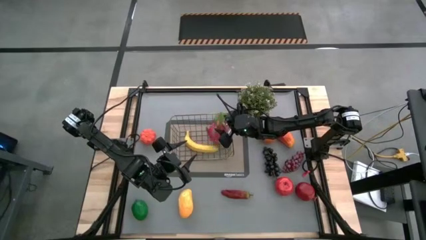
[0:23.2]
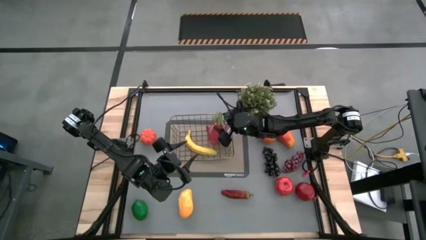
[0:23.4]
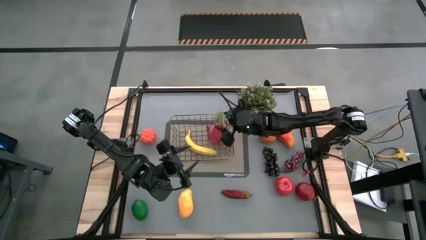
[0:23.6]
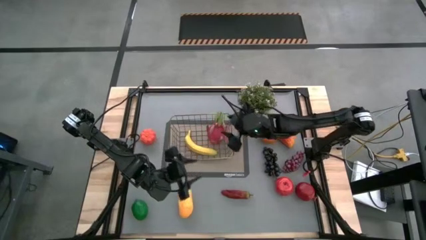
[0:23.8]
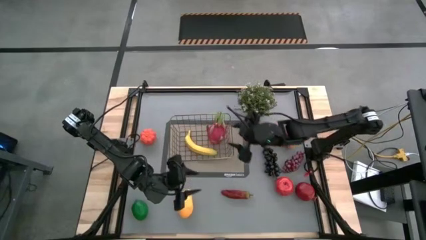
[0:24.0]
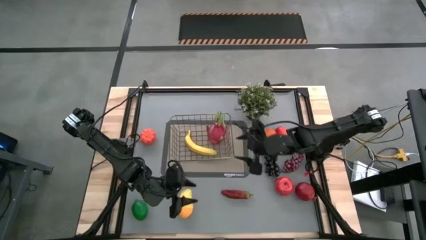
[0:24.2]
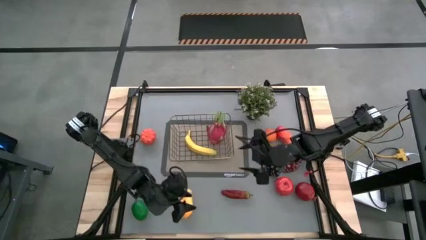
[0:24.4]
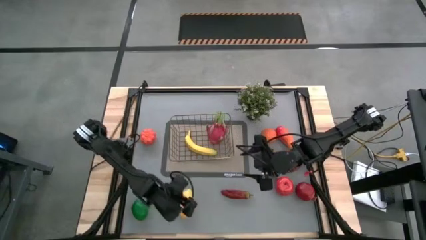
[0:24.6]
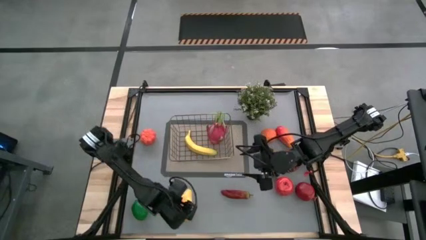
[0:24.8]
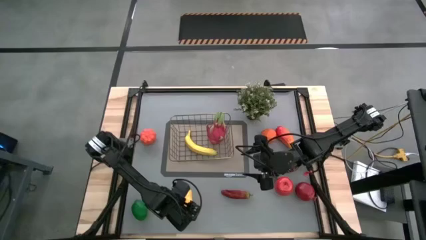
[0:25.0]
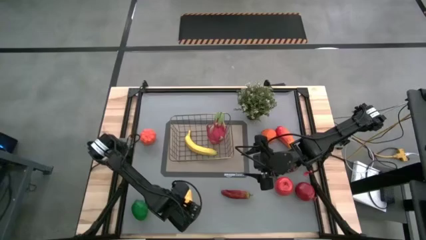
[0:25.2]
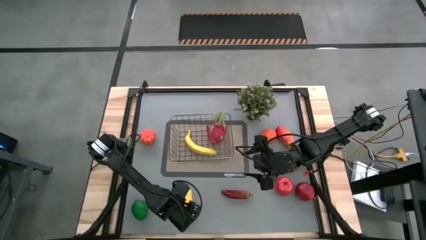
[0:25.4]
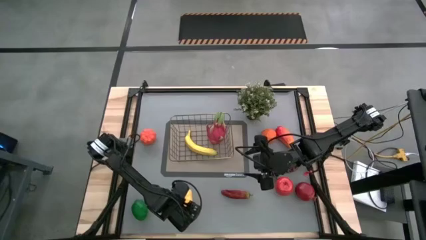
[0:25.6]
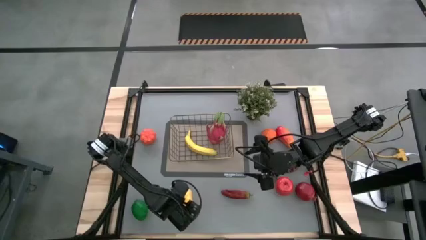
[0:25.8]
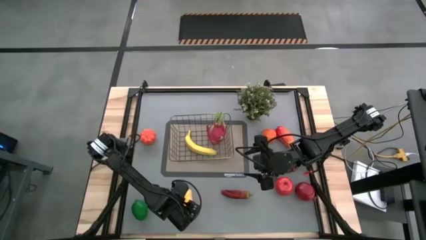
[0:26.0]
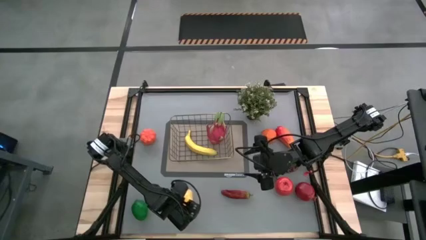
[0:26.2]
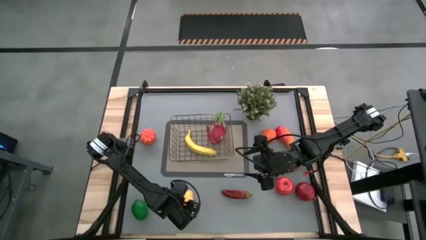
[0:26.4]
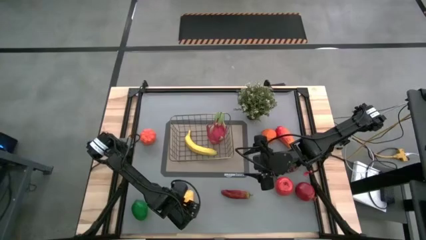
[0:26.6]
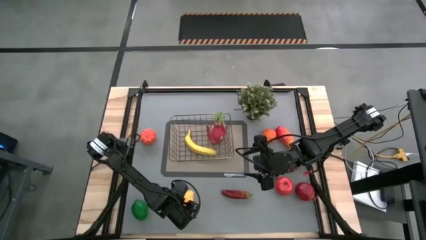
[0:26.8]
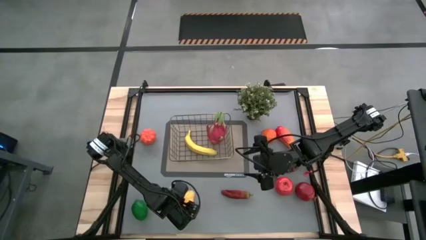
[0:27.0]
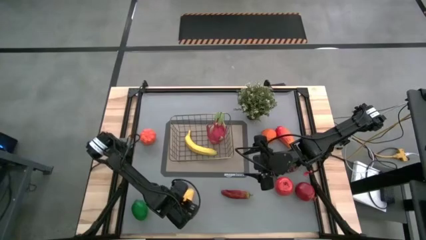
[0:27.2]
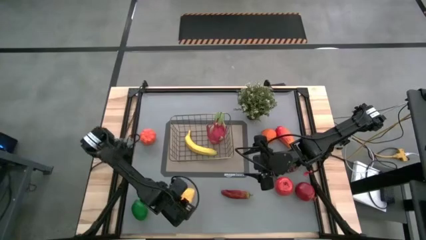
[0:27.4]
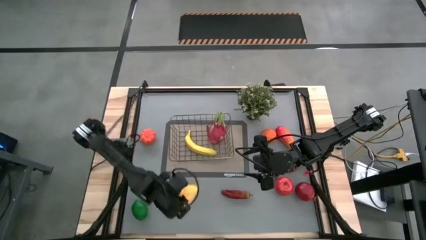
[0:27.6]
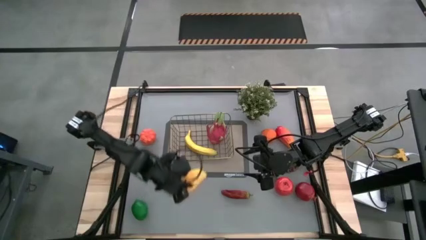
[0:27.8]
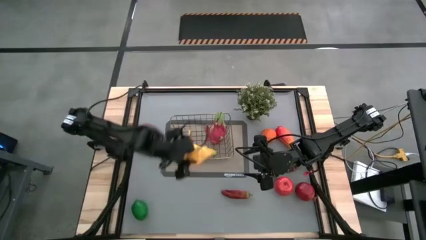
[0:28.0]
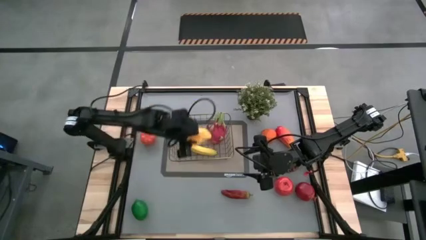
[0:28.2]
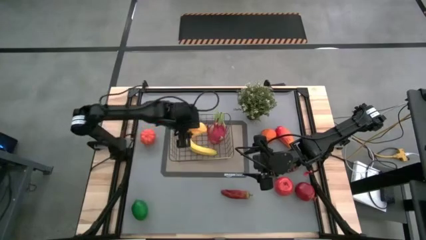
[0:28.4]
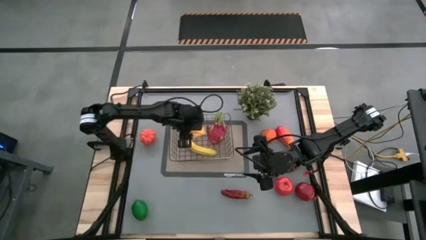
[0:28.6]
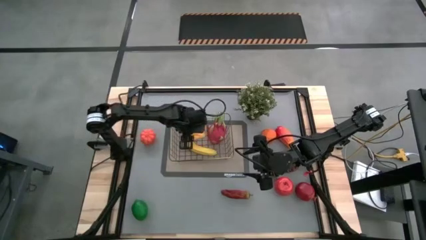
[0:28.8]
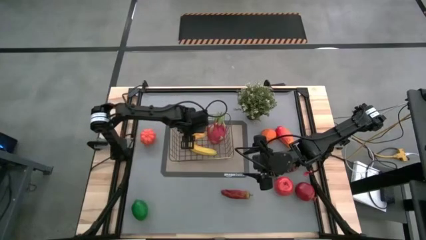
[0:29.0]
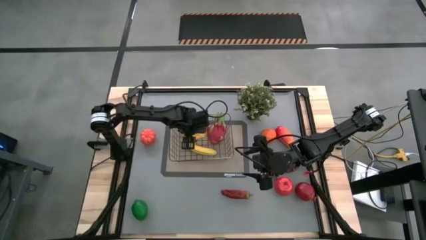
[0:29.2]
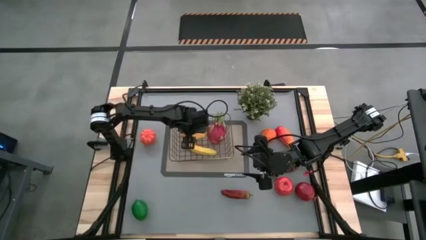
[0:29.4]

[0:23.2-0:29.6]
Task: Build produce basket
Put the mango into the wire basket

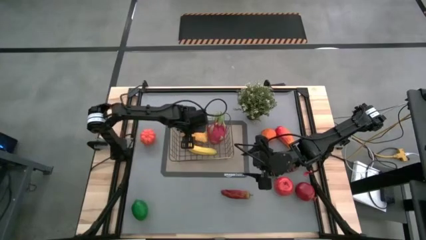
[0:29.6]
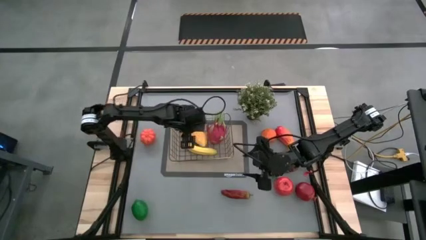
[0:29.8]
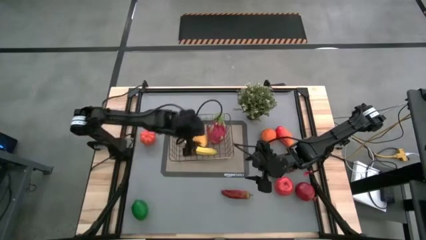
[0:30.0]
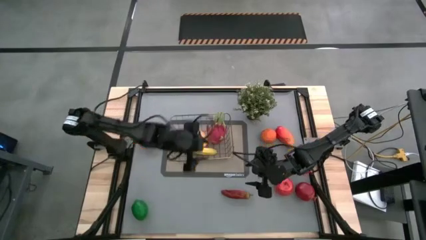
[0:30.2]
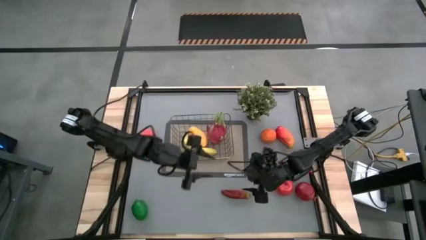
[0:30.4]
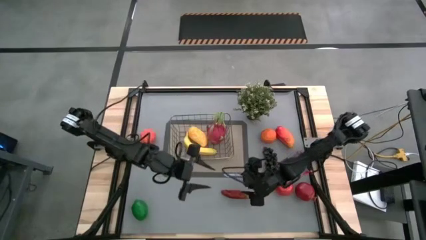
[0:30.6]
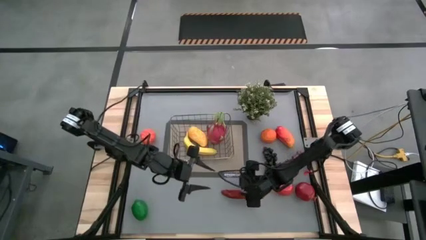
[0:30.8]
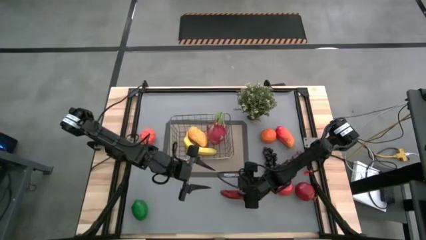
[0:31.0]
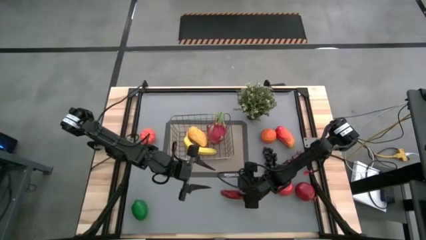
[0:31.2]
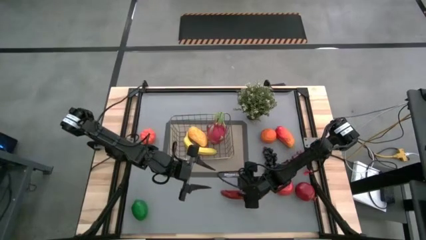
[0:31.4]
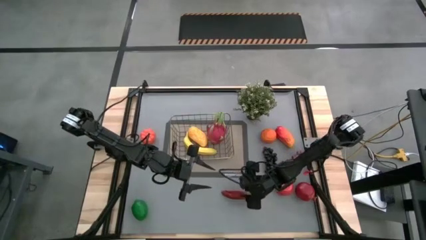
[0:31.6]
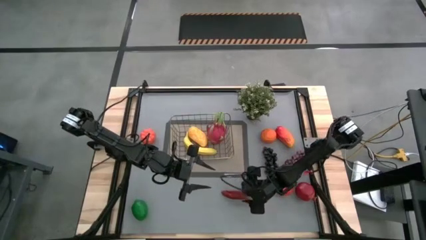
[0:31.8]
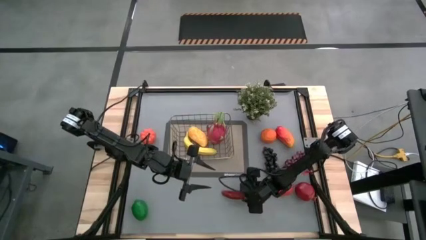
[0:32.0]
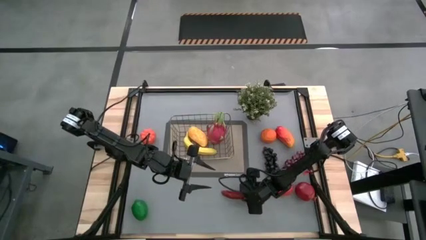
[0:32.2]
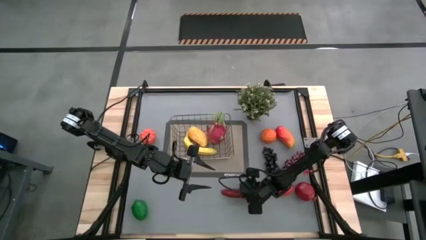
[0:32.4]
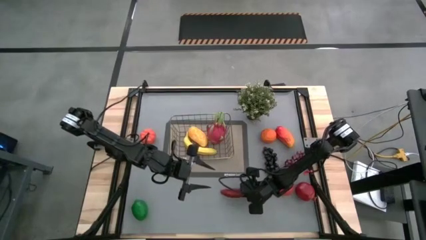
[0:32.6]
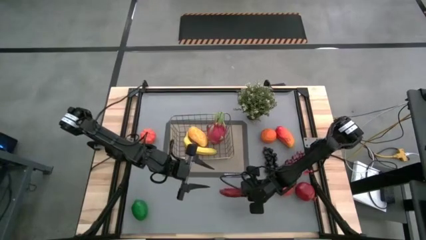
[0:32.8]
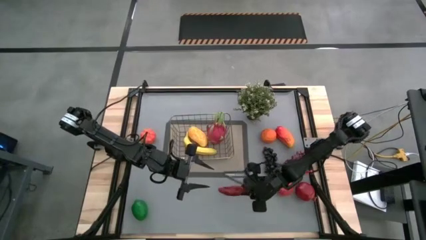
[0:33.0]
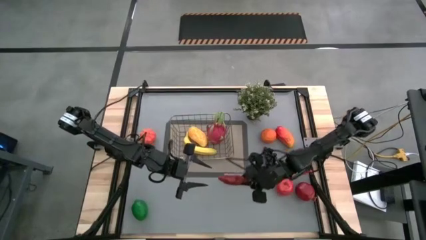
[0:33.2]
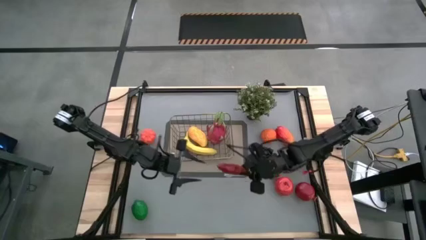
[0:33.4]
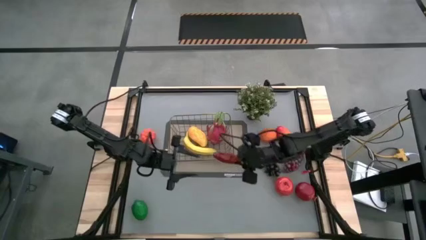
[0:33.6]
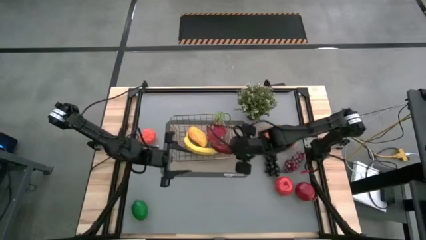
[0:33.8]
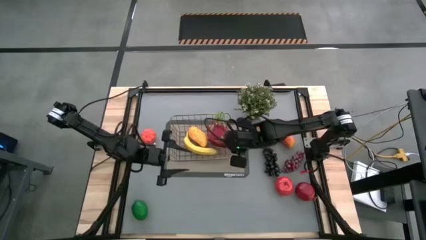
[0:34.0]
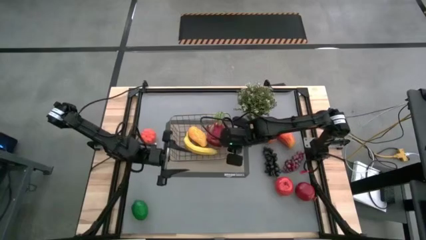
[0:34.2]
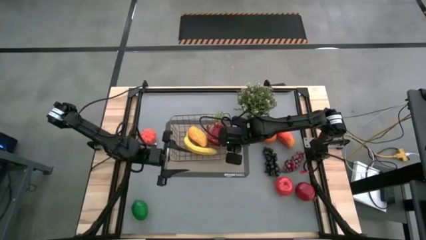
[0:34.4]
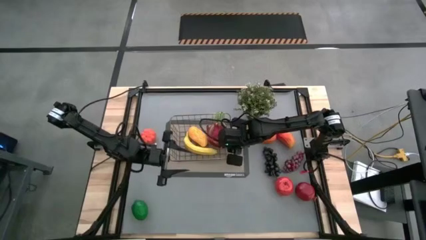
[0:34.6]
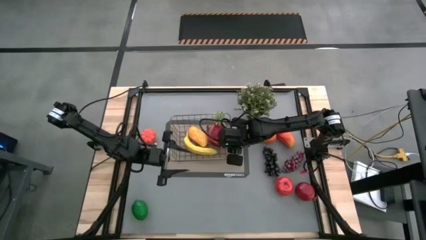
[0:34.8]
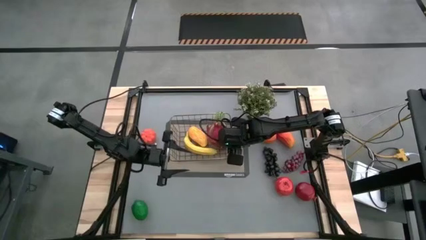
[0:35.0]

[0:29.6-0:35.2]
Put the chili pepper into the wire basket

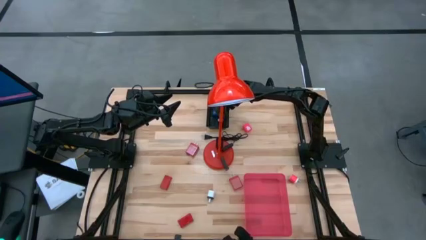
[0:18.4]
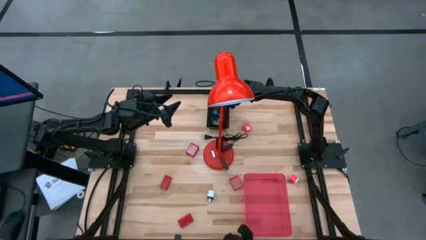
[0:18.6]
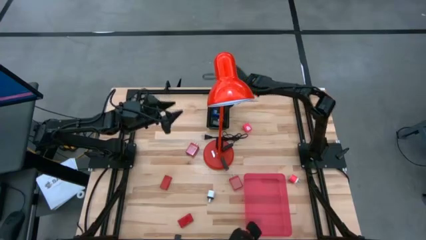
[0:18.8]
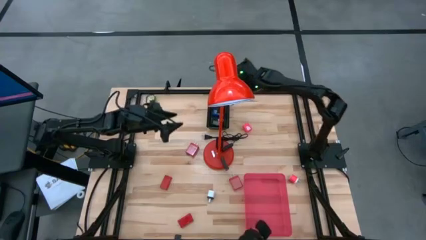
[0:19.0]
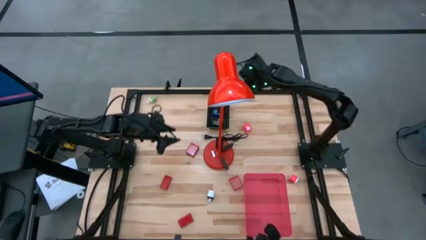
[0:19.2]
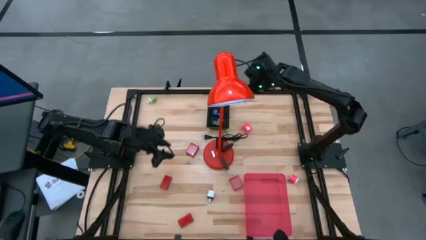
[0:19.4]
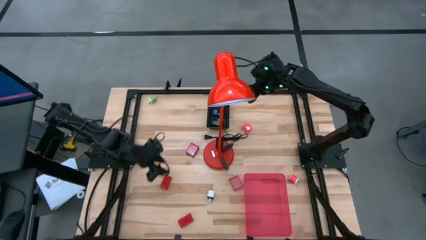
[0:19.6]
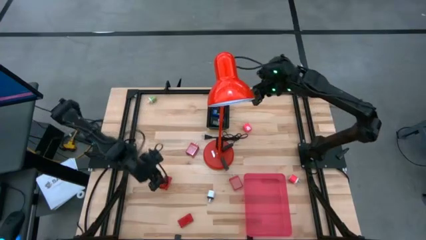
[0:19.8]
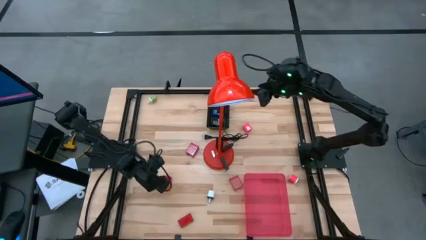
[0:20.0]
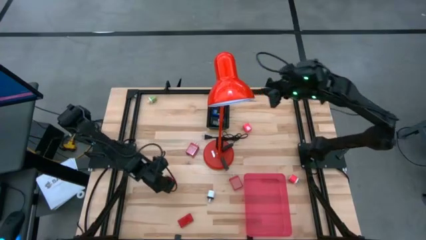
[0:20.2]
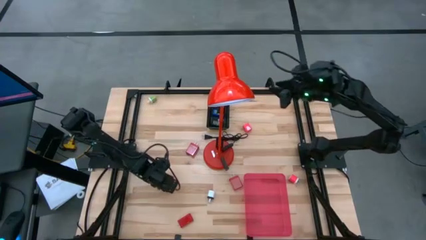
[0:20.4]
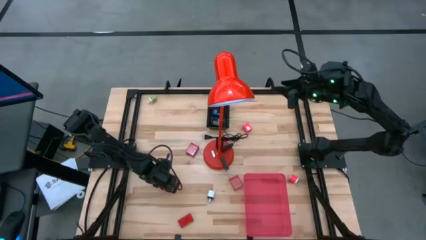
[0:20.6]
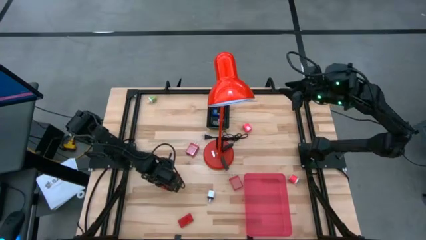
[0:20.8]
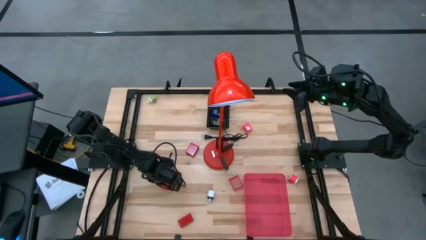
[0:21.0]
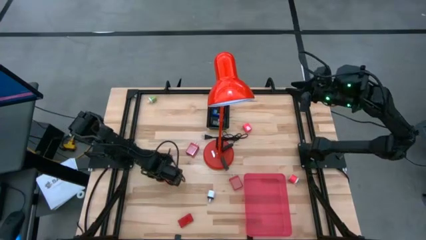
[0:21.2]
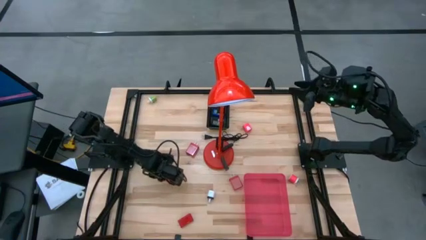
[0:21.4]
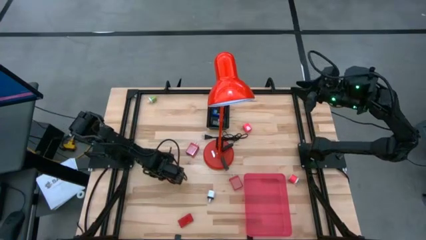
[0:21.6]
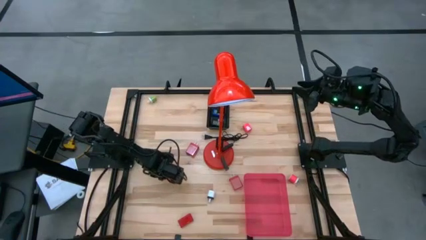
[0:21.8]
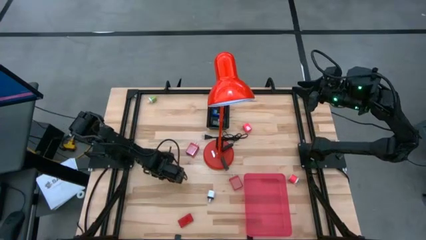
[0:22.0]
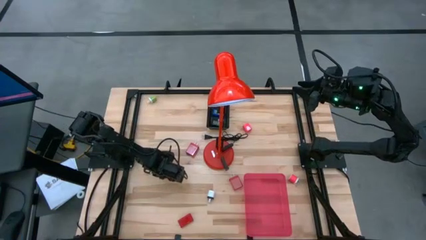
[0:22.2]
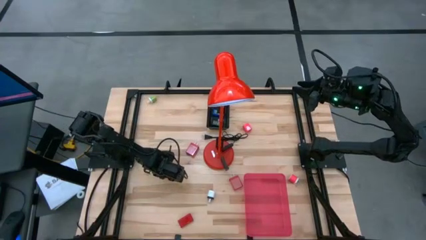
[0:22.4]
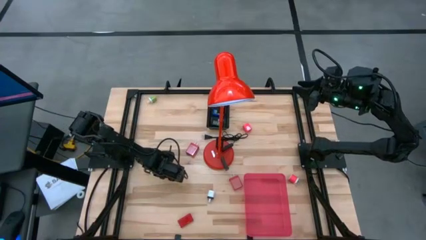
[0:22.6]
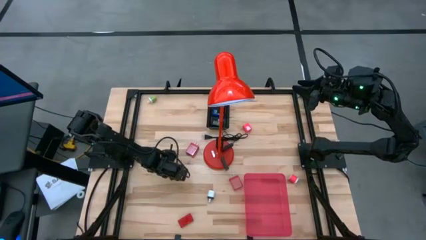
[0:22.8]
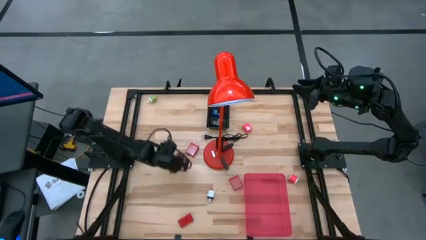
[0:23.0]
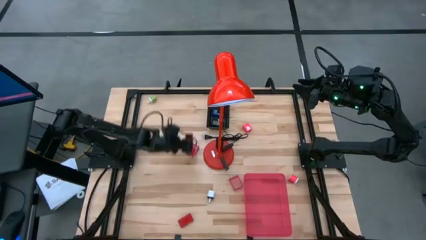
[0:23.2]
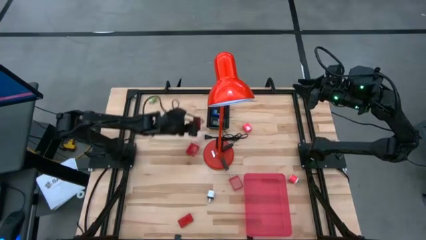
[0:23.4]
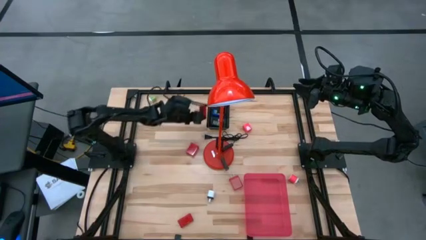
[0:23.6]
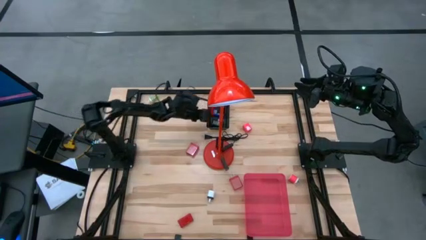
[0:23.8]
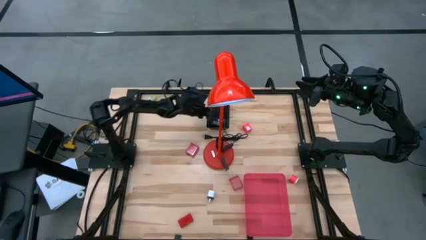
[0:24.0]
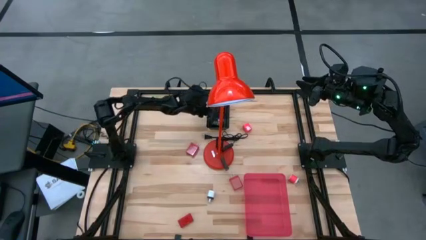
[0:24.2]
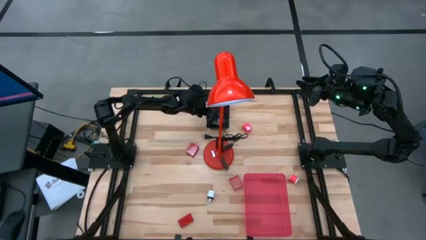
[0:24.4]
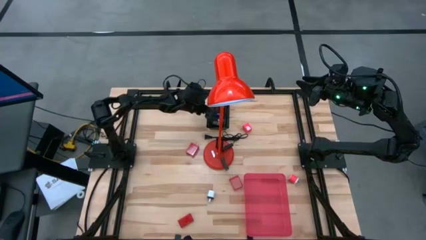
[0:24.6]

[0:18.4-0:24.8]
Task: Pick & Place Office items
Put the top red digital timer into the black bin
